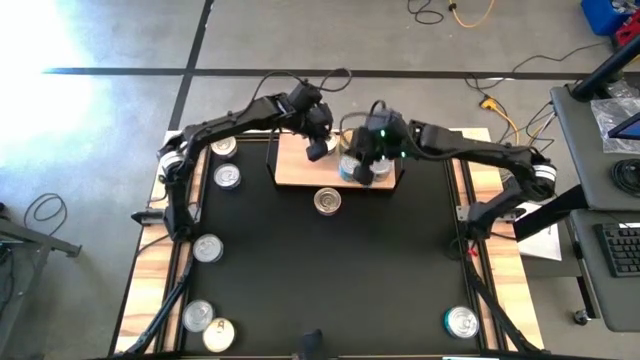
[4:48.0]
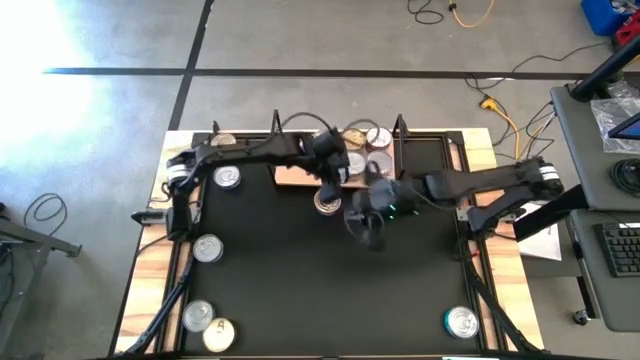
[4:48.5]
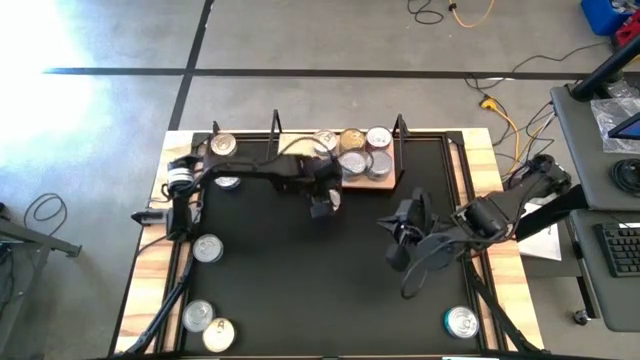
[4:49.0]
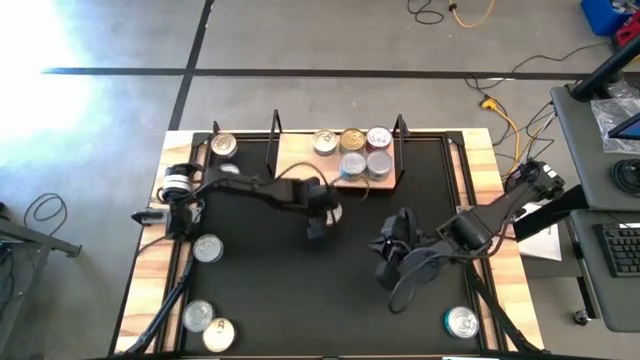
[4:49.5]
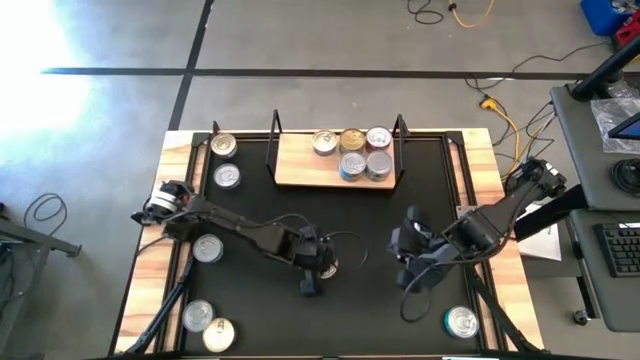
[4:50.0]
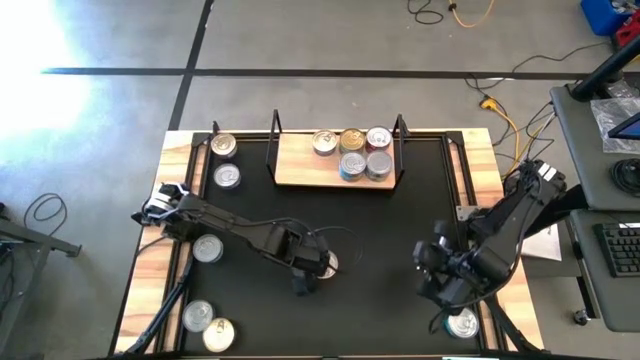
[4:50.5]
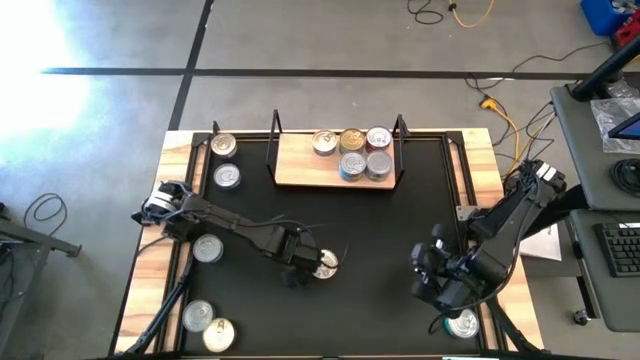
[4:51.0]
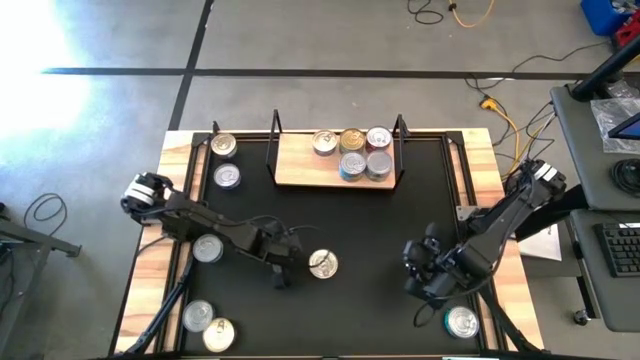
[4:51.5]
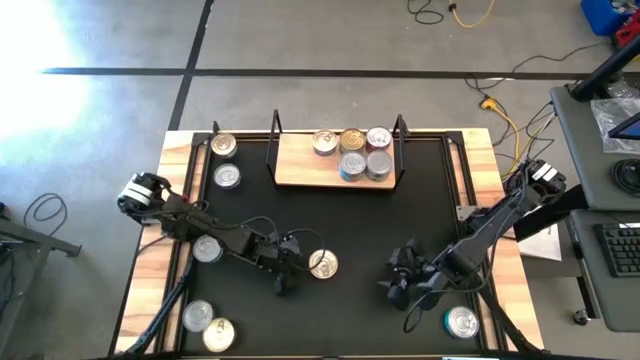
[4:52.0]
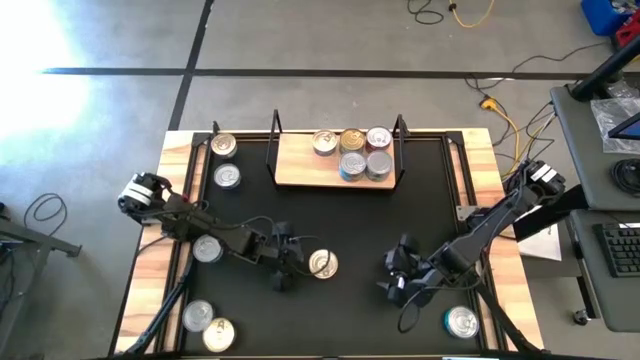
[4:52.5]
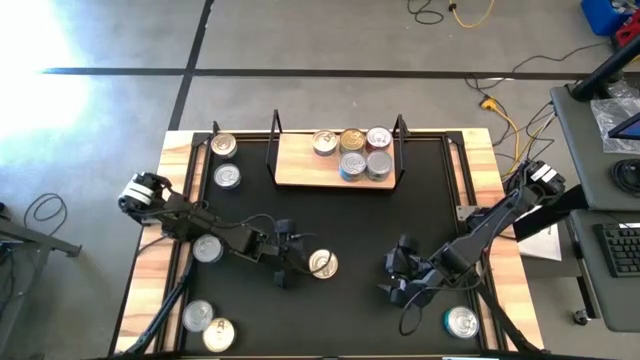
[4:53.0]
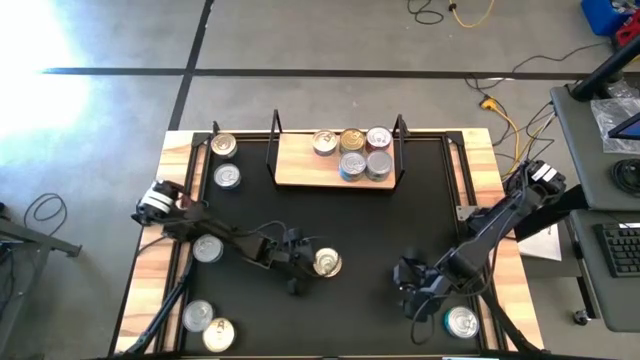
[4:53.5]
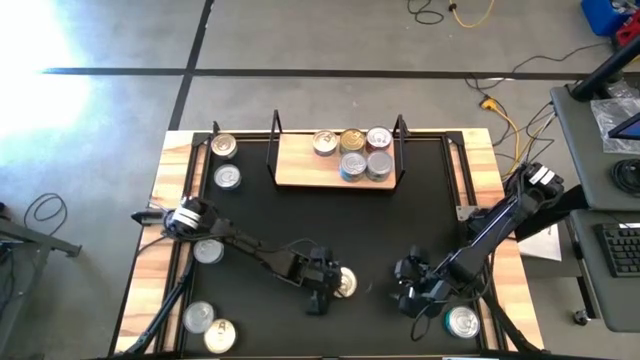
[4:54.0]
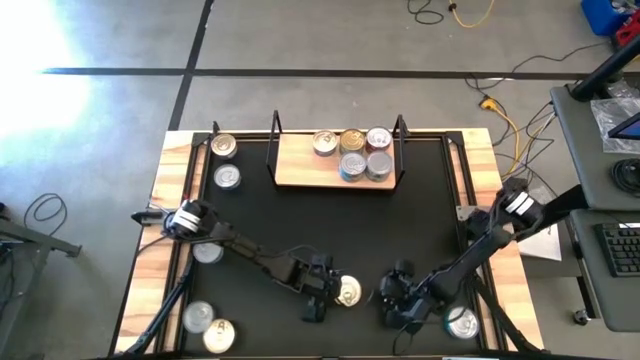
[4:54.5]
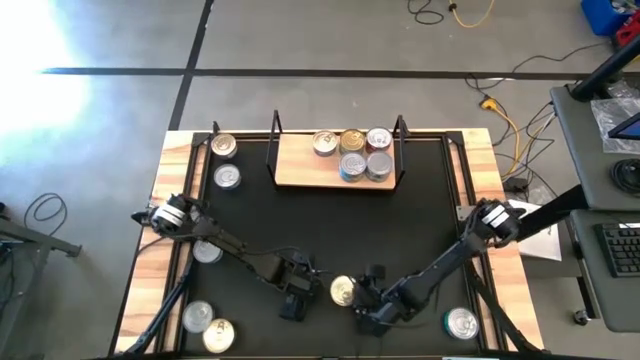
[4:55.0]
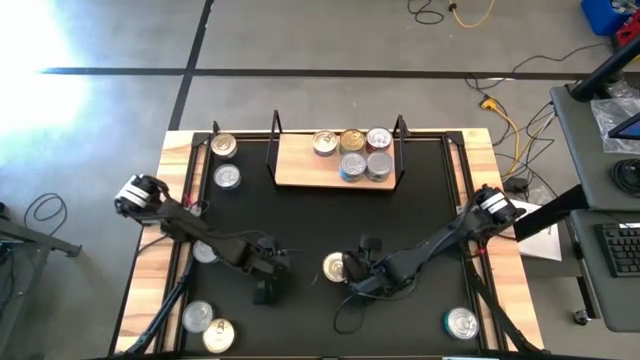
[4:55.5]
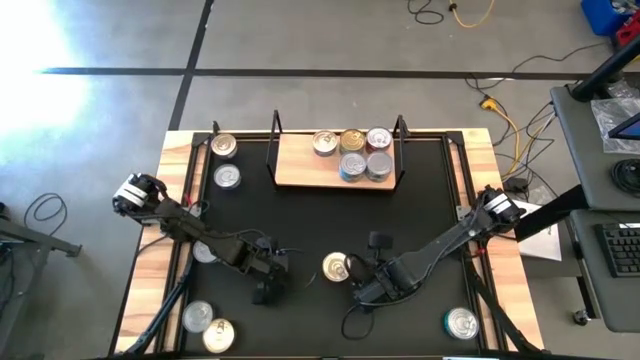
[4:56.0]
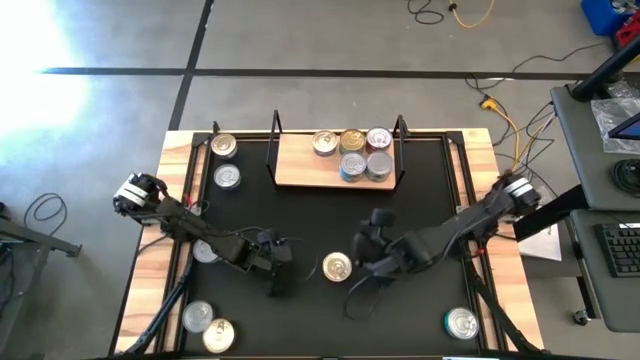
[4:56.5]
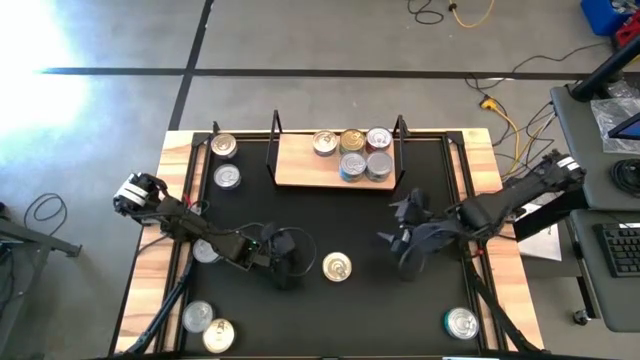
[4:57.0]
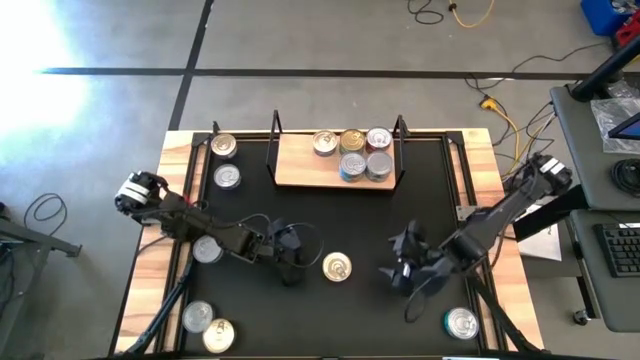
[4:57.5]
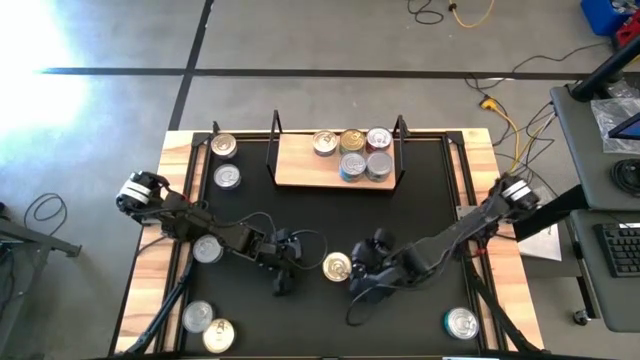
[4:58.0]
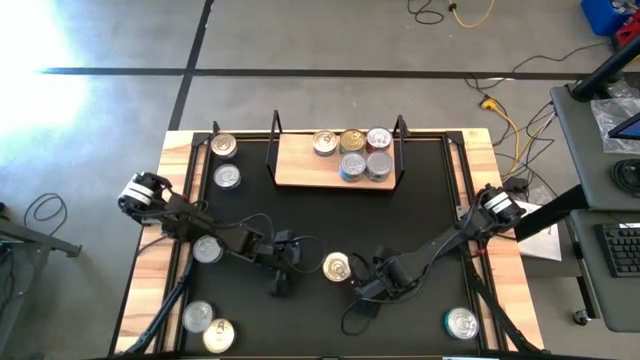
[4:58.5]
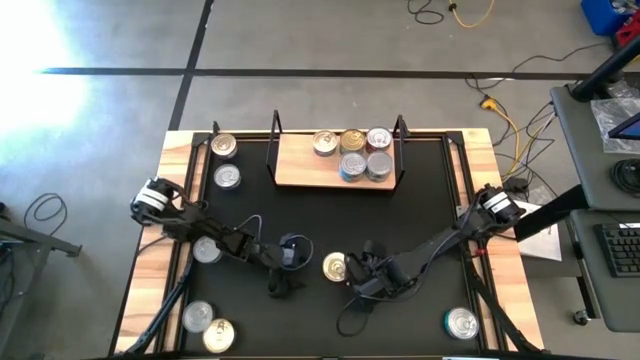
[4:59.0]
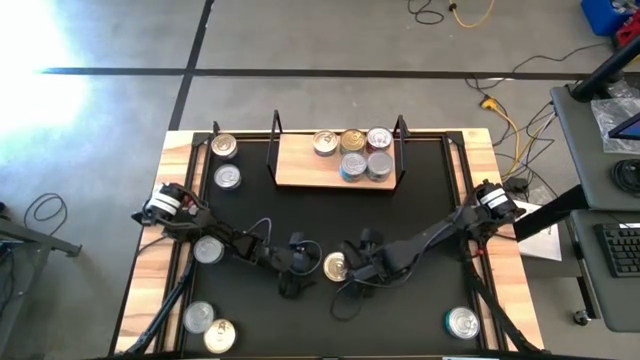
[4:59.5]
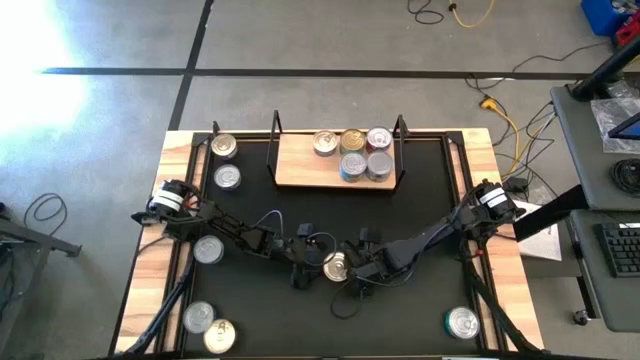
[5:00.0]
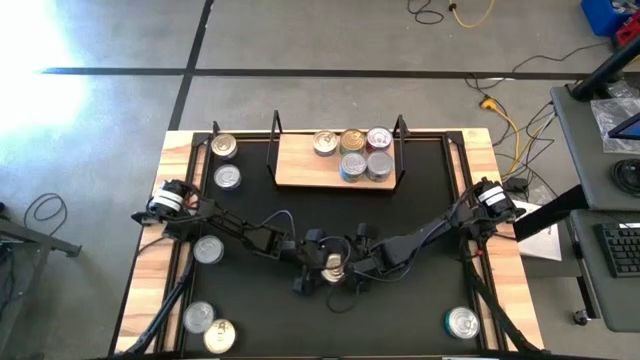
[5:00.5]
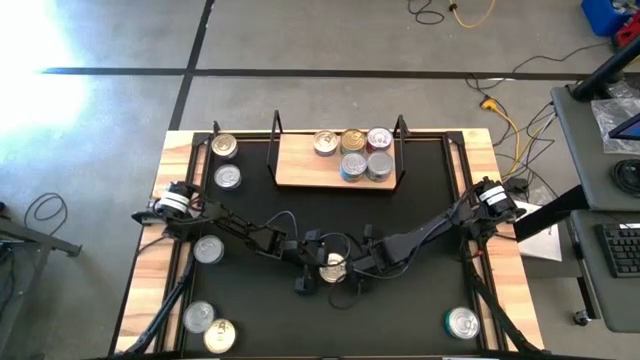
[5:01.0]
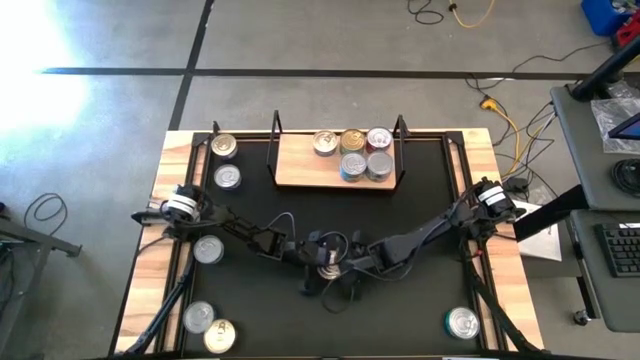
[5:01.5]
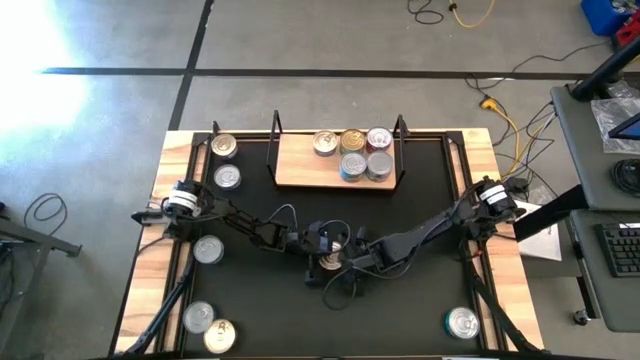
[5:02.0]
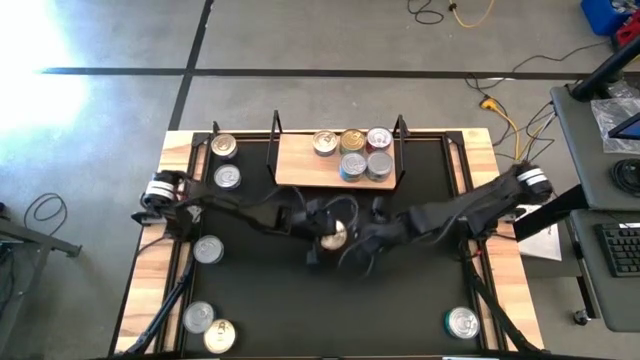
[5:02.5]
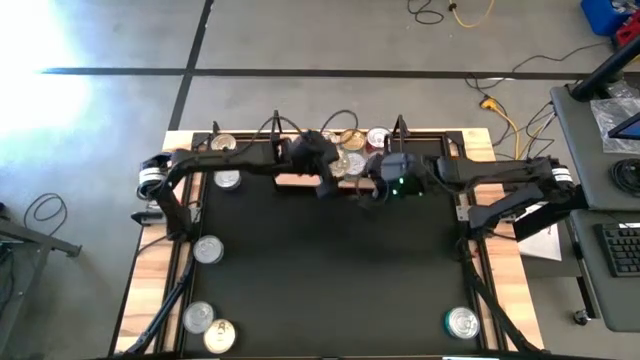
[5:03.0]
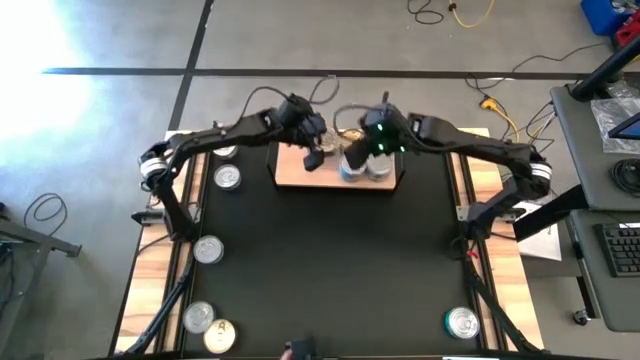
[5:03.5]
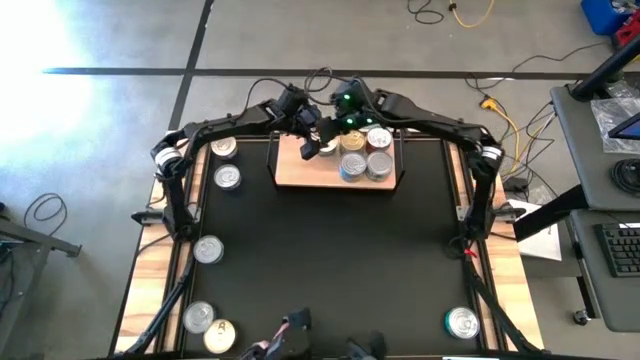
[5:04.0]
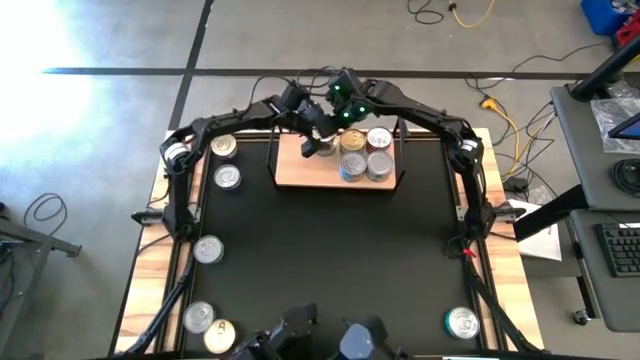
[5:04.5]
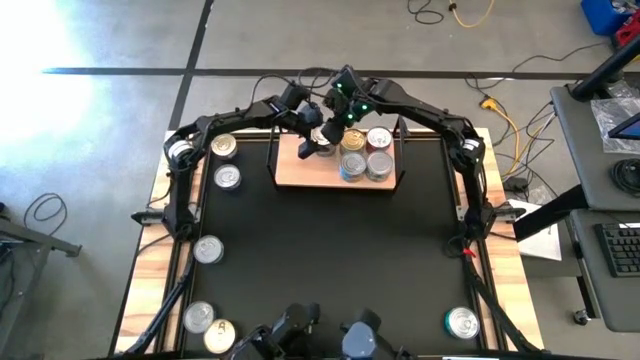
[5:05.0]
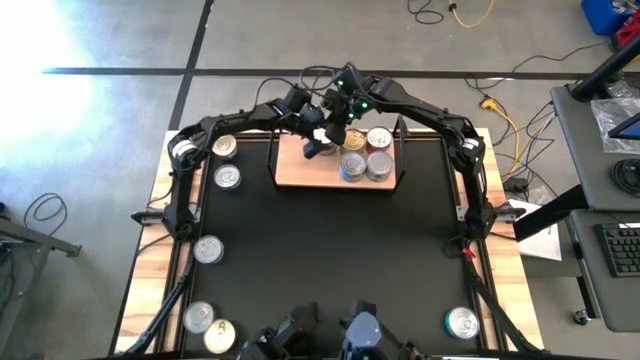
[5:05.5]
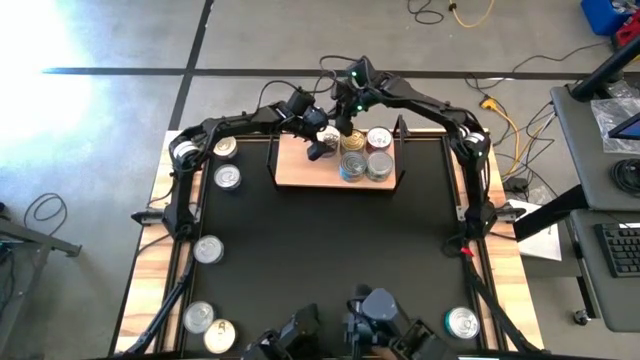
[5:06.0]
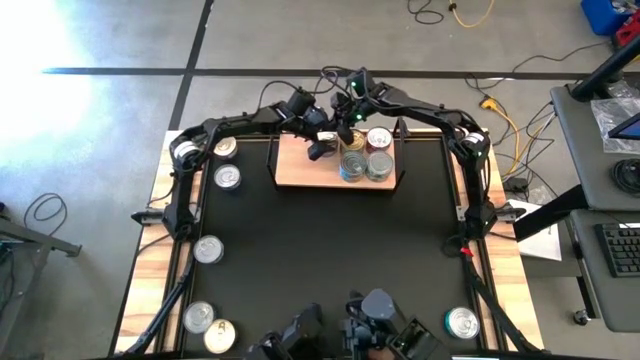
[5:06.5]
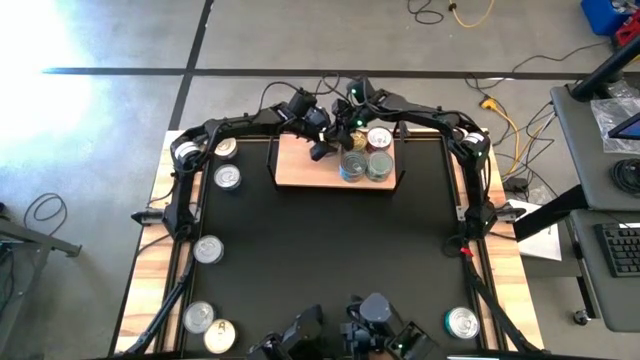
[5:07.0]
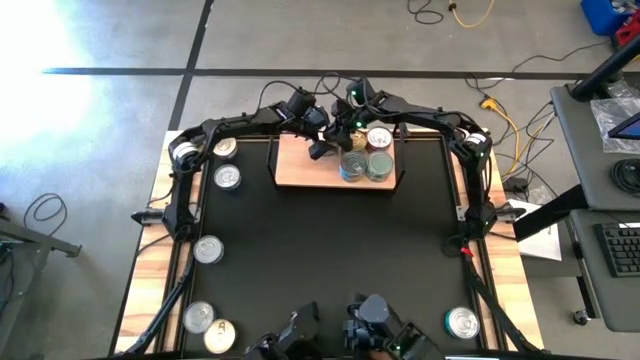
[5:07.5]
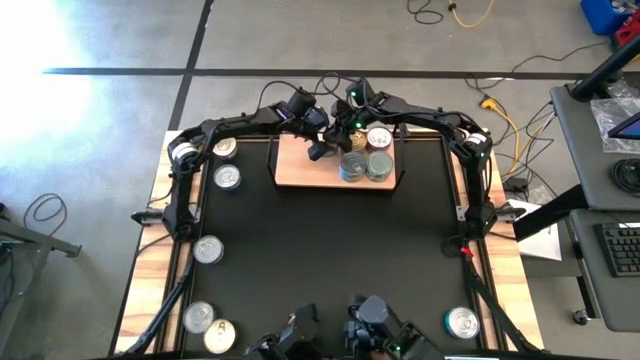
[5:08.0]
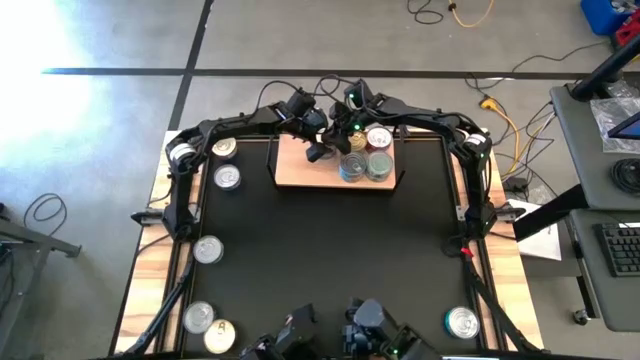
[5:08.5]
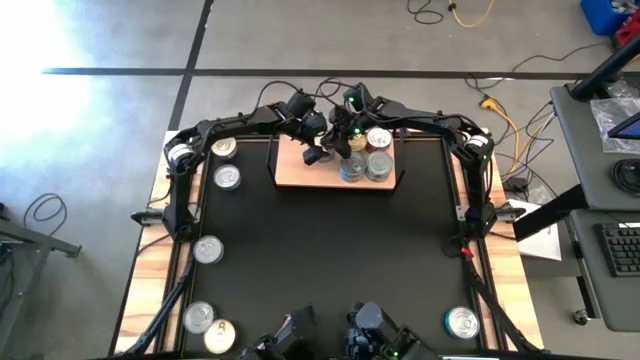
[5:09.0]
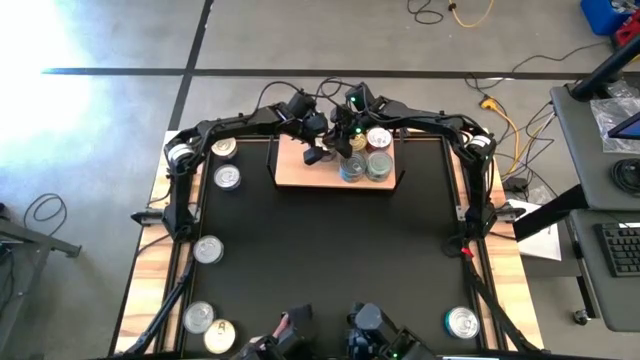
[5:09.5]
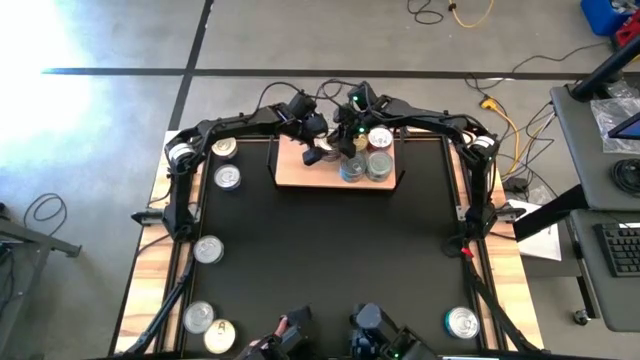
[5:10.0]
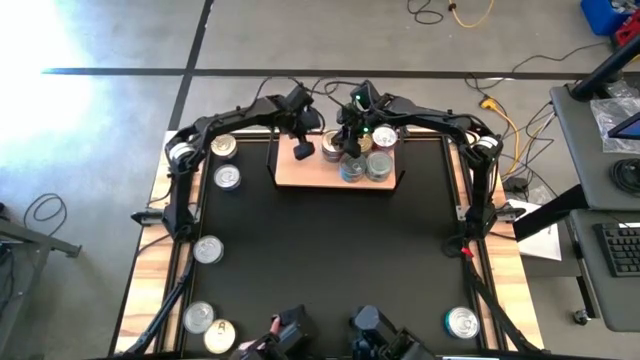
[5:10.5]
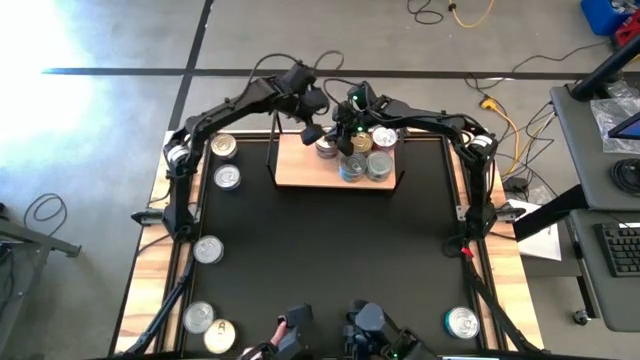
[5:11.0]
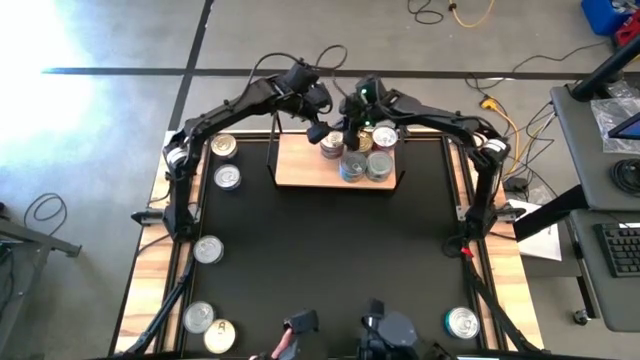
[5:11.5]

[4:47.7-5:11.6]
Task: Stack canned seafood by type on shelf
Stack the blue-pink tuna can on top of the other blue-pink tuna can on the shelf
